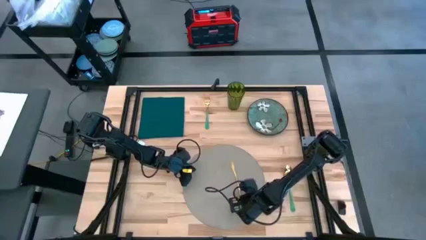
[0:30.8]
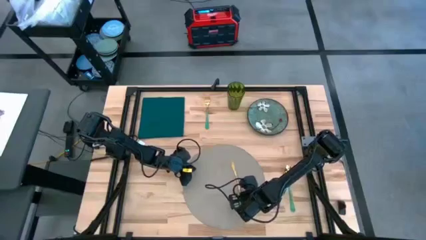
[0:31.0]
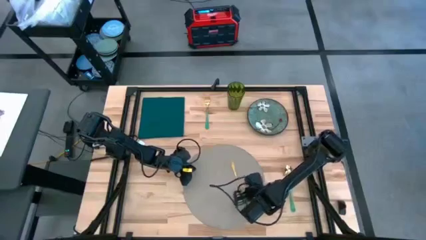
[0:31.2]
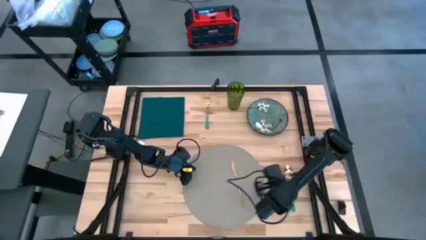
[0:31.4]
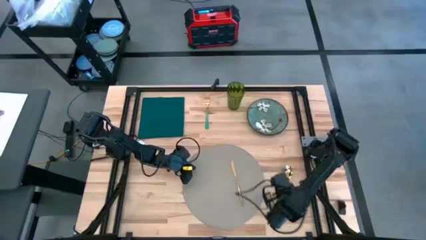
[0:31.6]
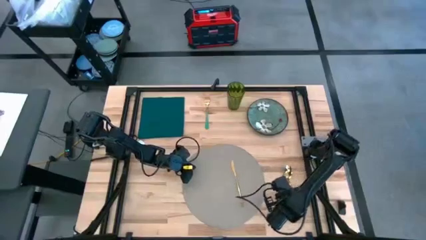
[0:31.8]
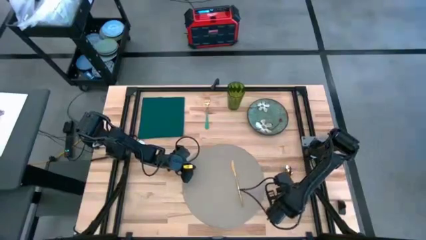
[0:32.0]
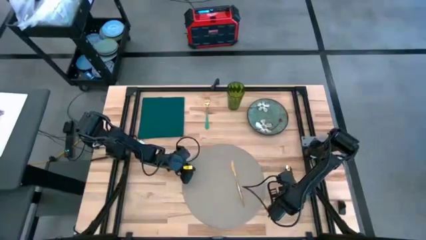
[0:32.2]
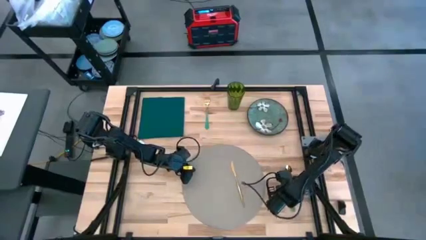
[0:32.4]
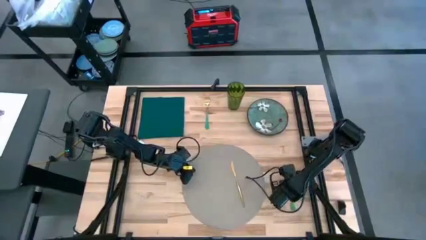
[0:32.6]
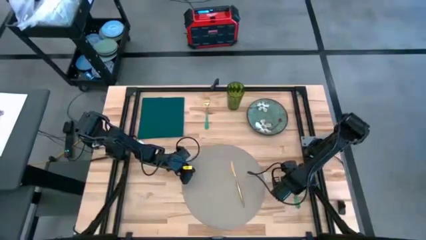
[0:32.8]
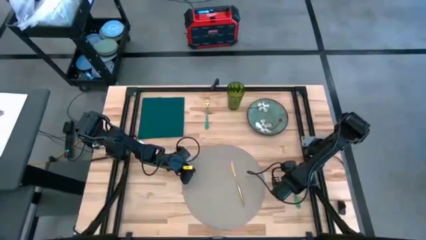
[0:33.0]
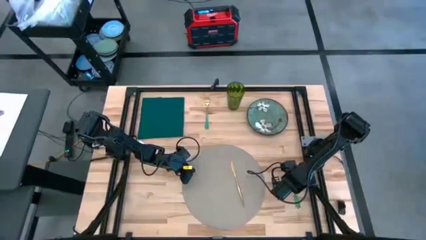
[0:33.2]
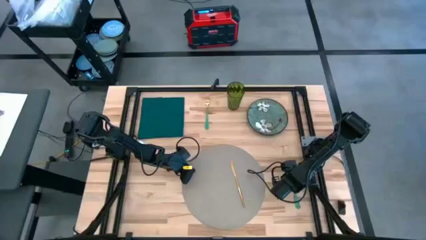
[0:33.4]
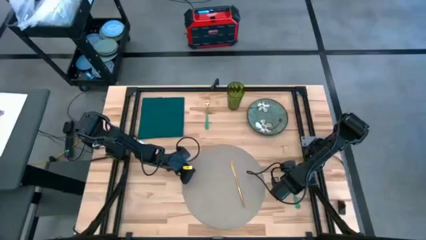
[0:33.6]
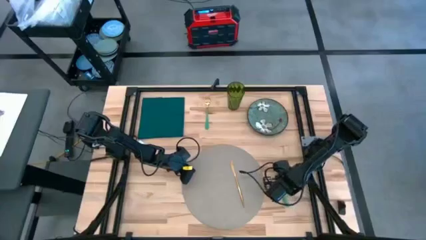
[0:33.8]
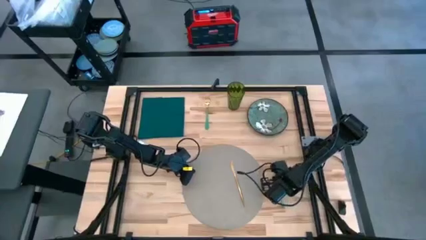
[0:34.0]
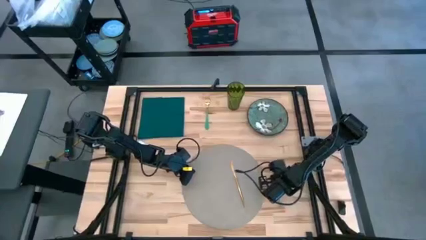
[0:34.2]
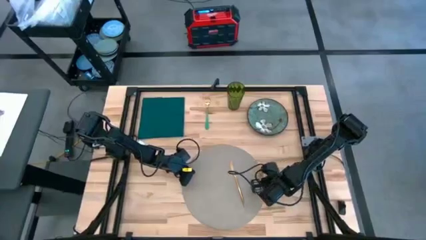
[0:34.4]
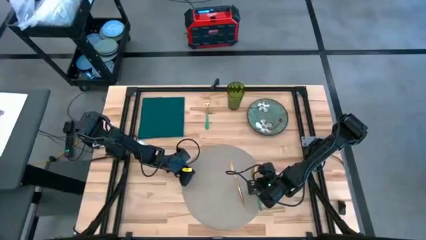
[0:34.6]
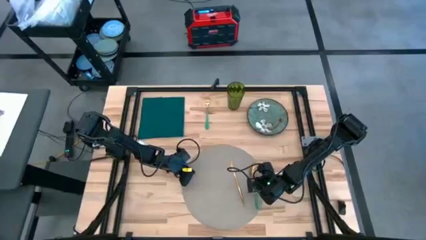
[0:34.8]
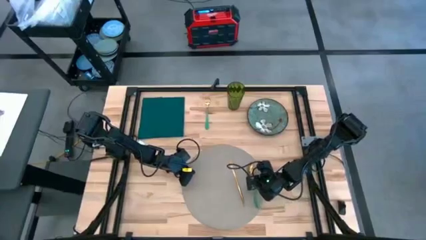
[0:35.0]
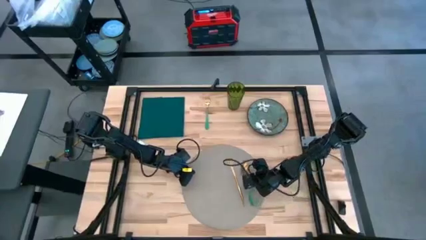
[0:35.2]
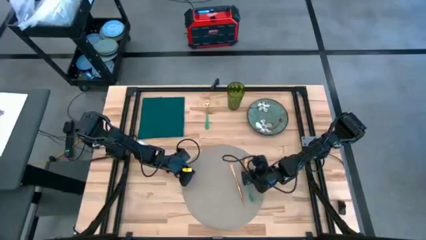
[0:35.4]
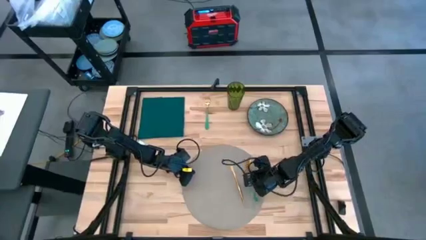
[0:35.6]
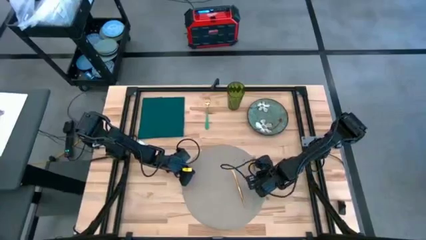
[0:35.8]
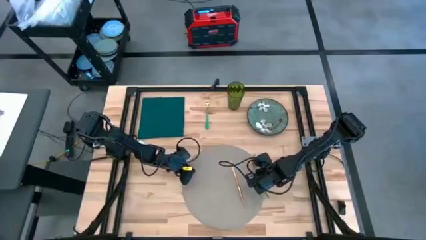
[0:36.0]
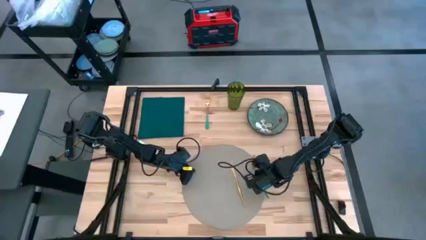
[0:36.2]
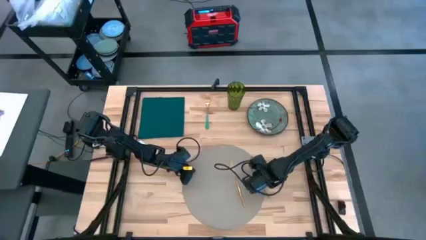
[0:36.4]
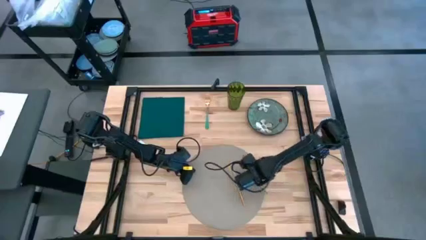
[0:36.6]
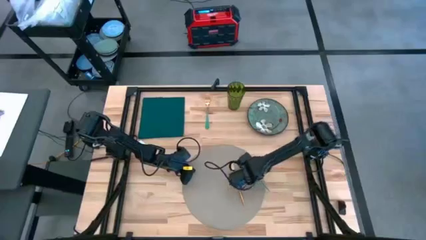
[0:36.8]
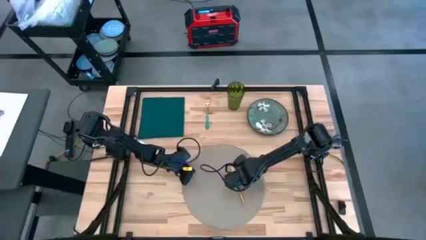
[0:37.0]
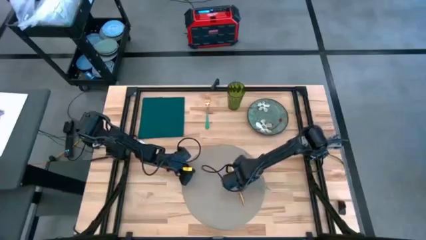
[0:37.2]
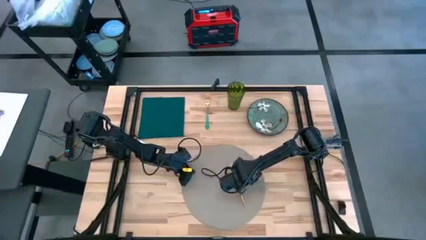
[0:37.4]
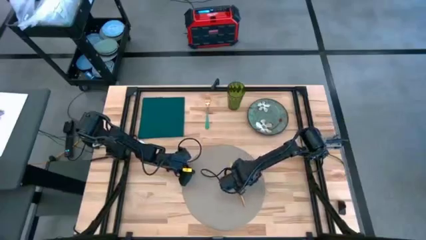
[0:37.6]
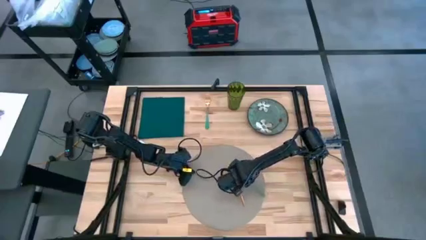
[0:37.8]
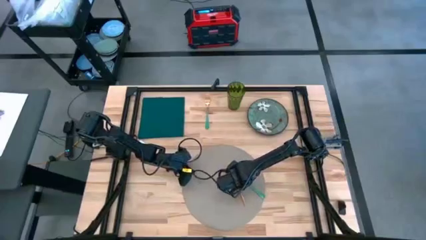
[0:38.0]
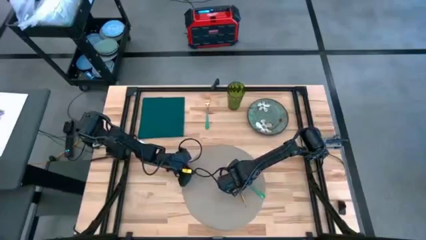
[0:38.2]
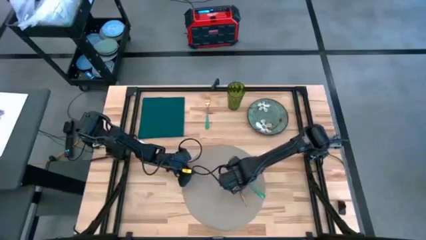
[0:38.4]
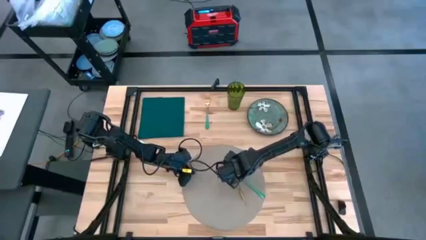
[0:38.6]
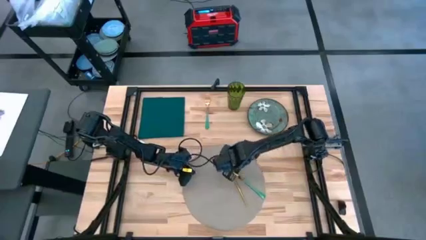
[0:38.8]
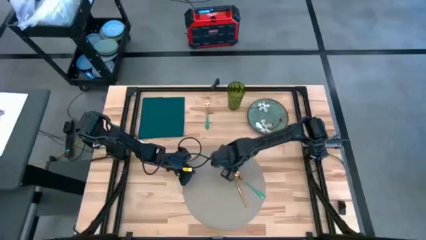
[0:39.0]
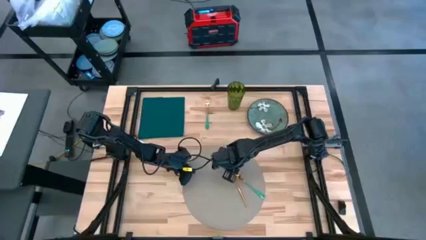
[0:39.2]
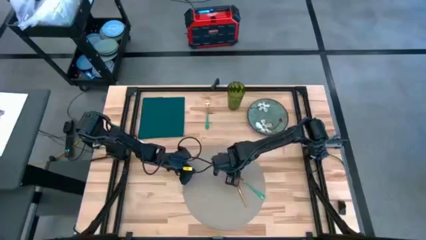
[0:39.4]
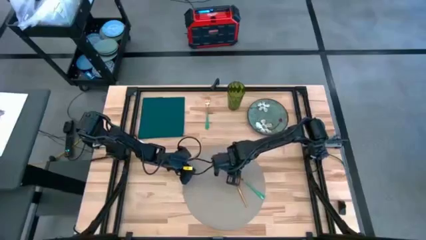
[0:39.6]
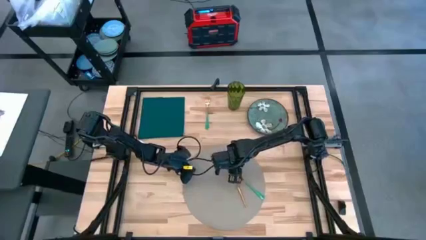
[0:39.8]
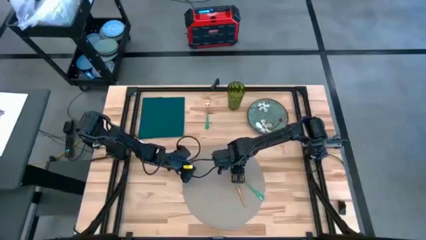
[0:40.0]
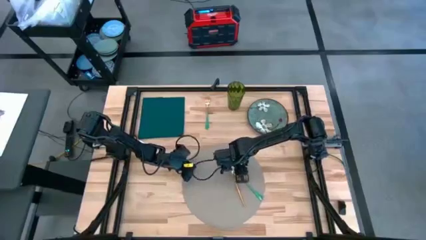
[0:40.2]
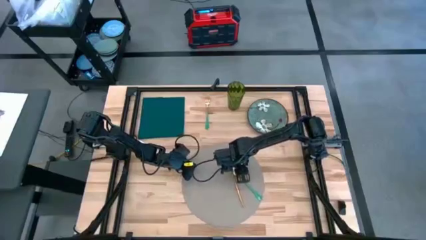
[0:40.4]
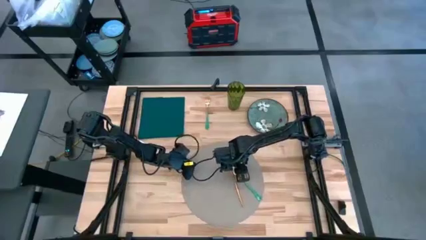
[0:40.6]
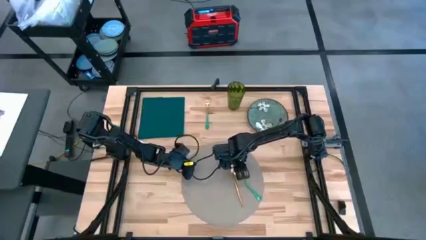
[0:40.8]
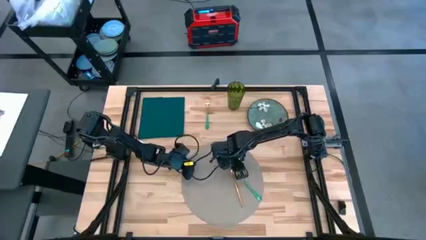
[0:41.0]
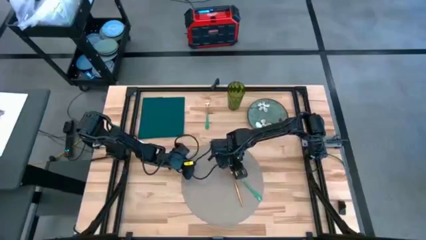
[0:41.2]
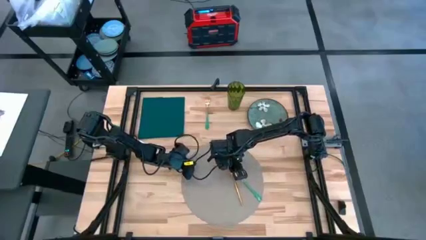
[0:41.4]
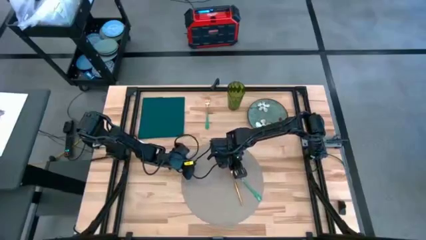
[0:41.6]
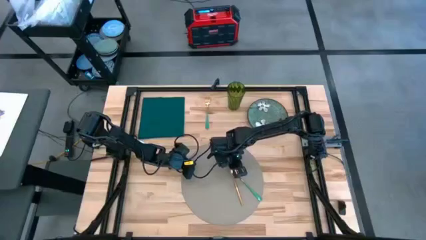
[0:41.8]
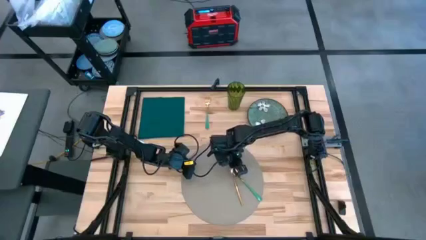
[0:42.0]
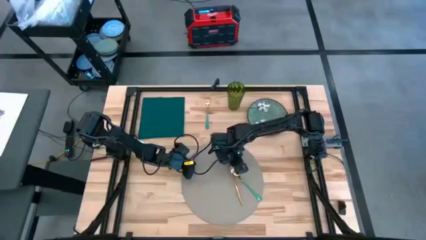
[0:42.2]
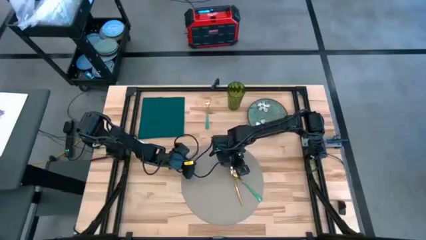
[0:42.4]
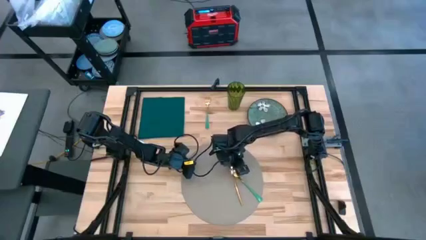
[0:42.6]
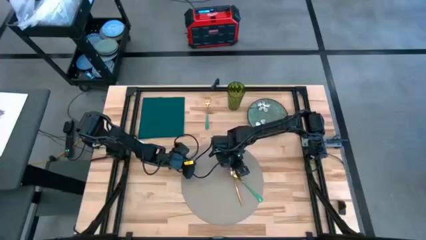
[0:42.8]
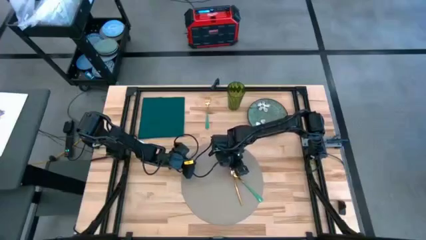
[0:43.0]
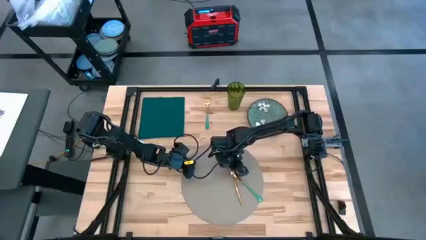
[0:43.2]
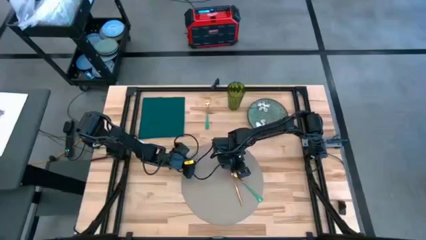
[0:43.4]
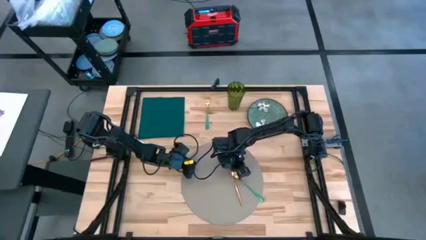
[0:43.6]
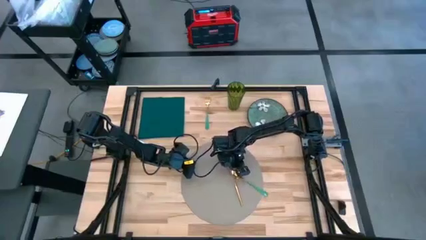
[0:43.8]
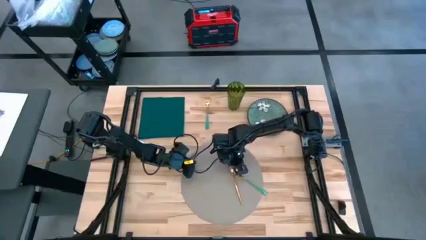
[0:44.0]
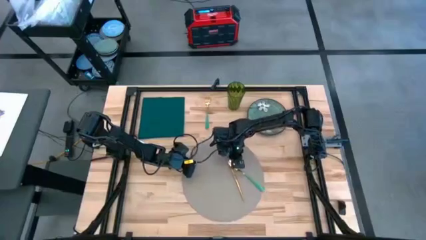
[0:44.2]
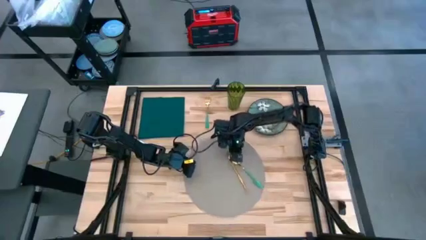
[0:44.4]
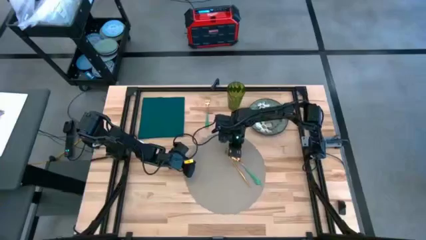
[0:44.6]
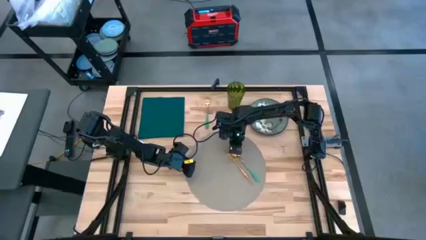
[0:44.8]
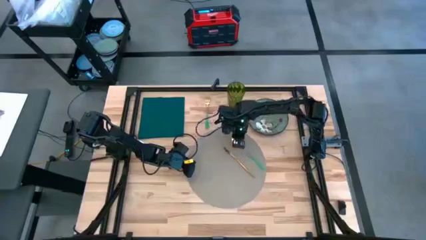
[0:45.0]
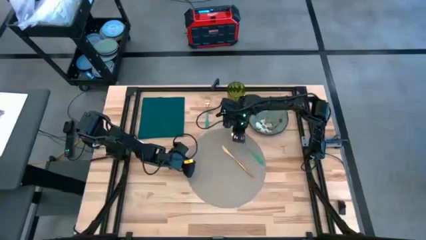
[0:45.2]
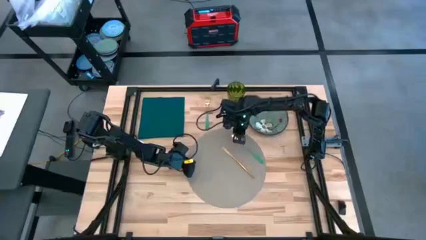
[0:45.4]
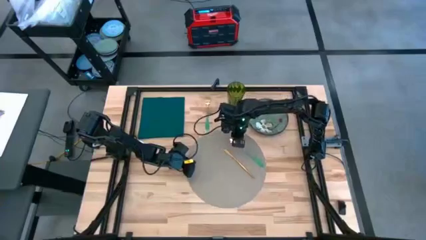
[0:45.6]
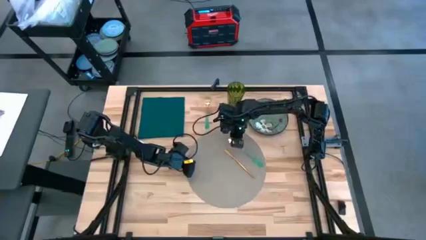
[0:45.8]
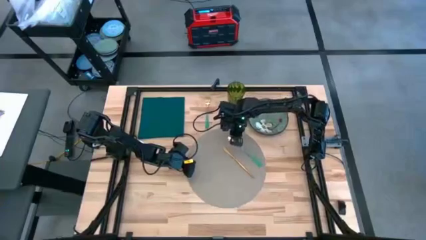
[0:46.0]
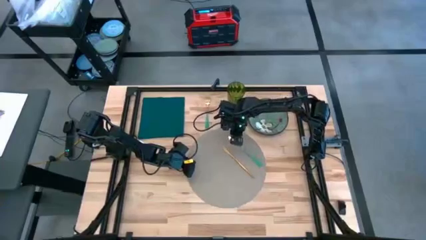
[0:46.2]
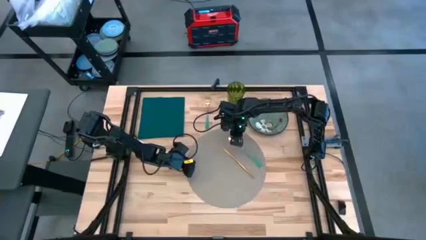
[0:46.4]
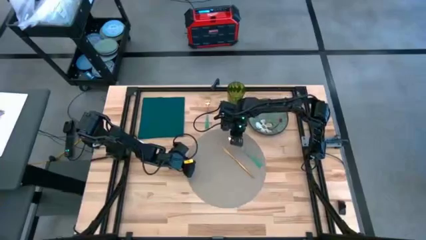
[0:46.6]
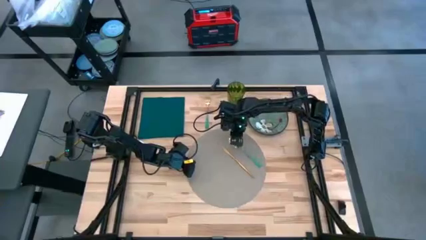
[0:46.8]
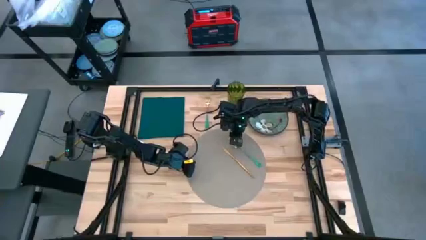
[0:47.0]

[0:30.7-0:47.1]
Task: Set table place
Put the spoon on the gray placemat
